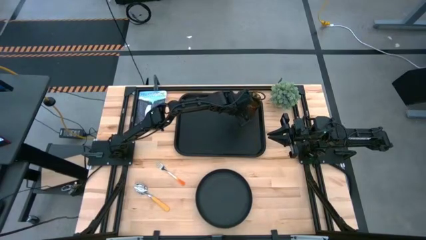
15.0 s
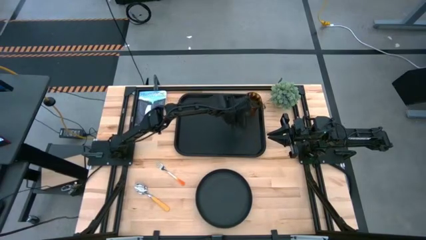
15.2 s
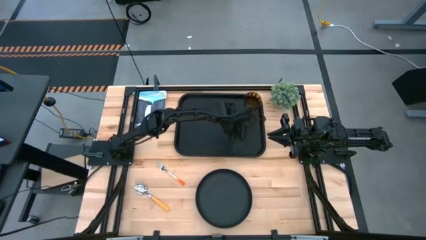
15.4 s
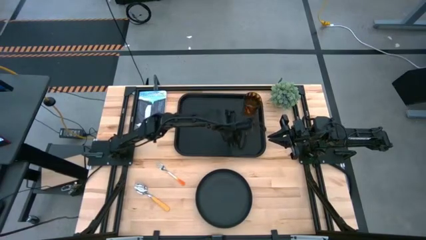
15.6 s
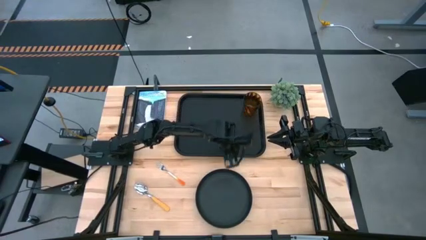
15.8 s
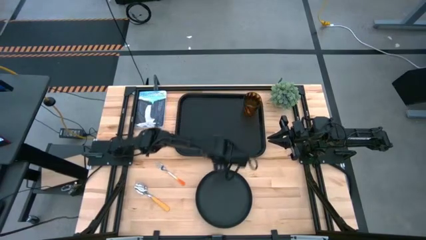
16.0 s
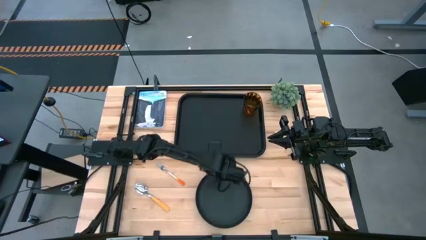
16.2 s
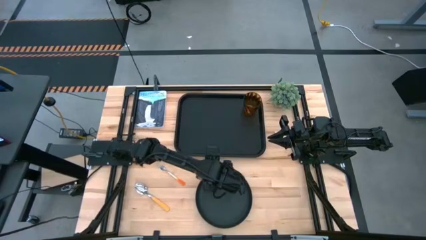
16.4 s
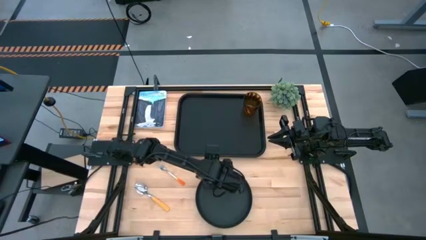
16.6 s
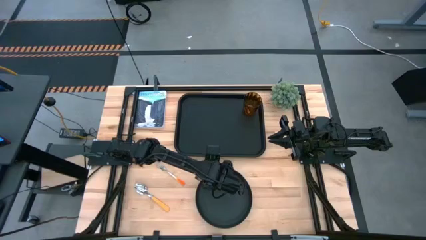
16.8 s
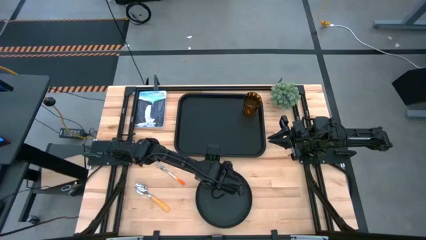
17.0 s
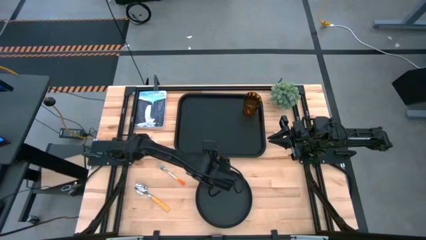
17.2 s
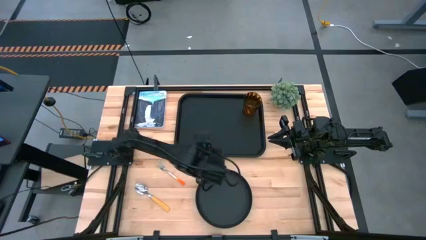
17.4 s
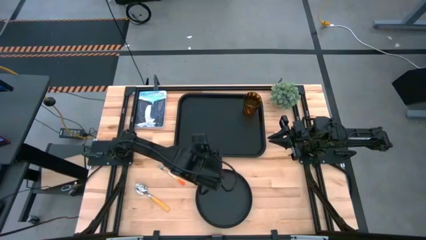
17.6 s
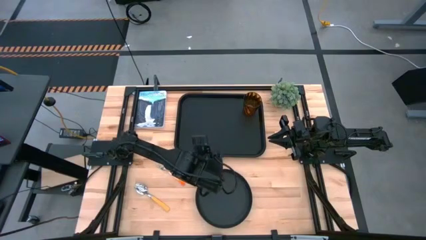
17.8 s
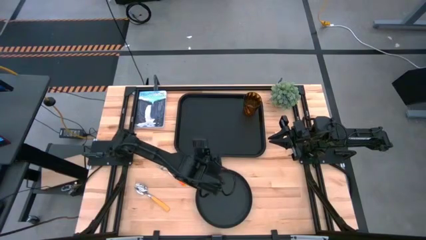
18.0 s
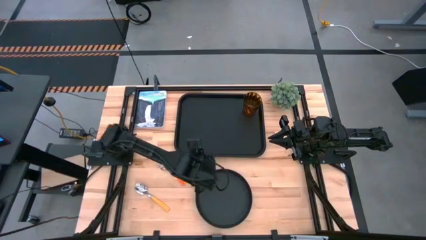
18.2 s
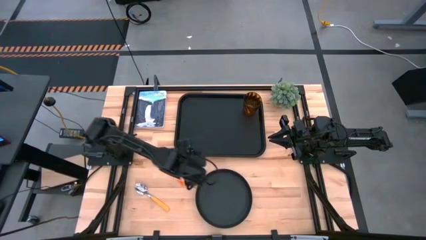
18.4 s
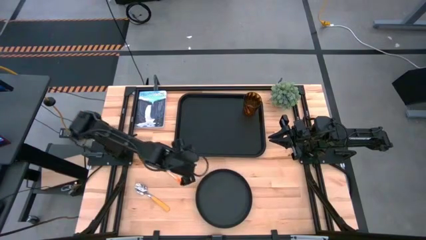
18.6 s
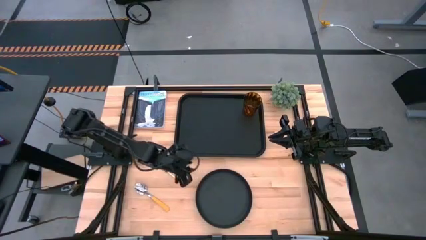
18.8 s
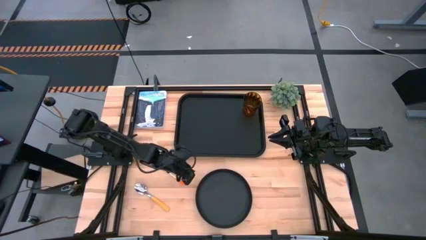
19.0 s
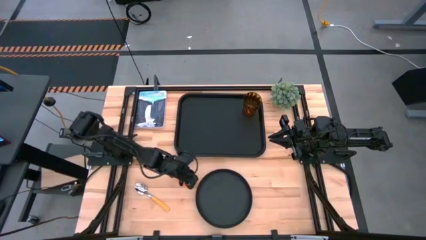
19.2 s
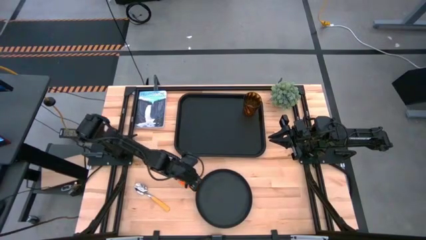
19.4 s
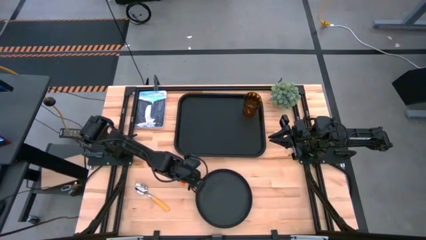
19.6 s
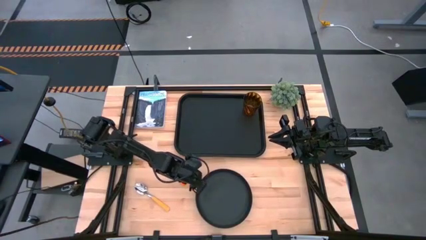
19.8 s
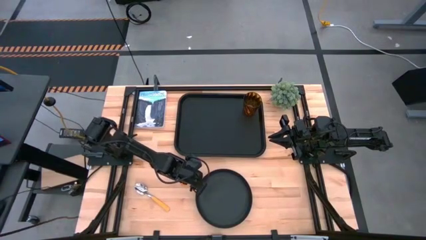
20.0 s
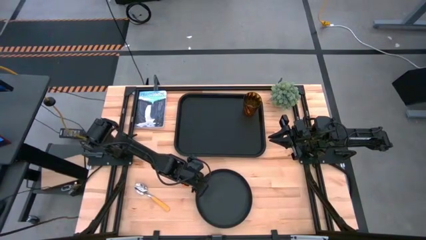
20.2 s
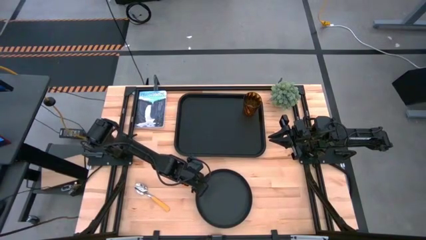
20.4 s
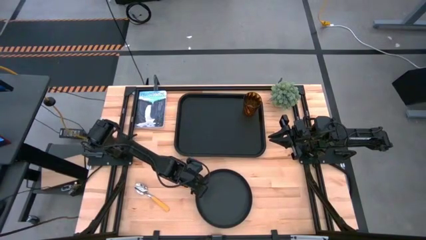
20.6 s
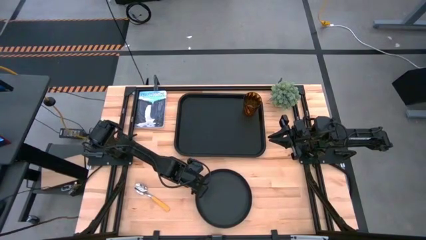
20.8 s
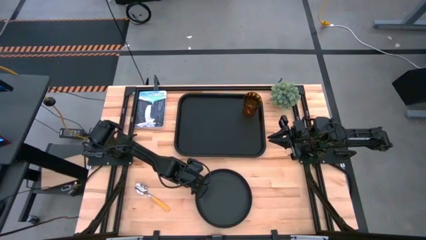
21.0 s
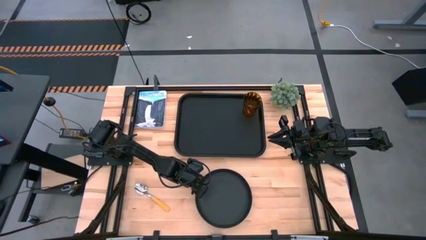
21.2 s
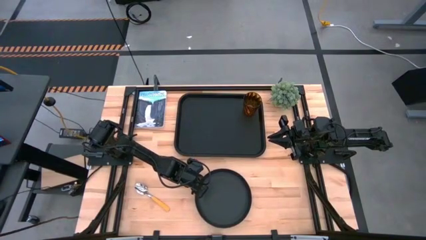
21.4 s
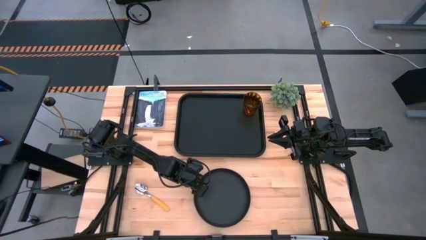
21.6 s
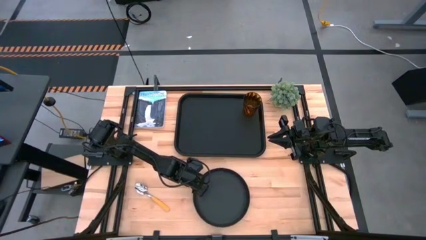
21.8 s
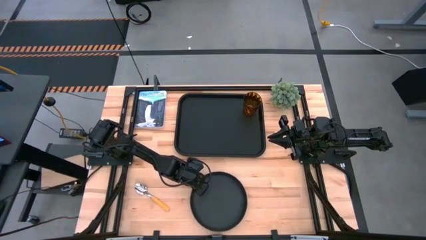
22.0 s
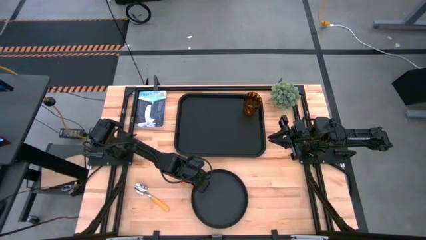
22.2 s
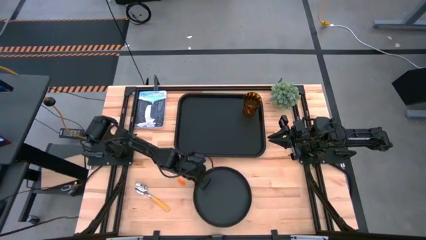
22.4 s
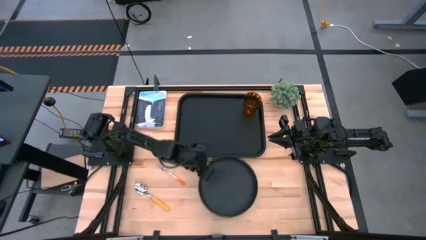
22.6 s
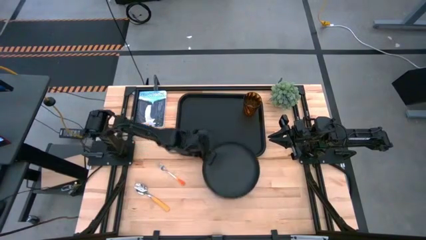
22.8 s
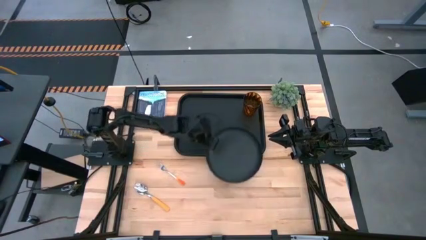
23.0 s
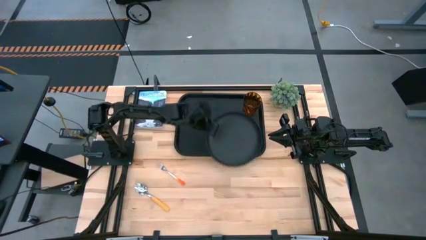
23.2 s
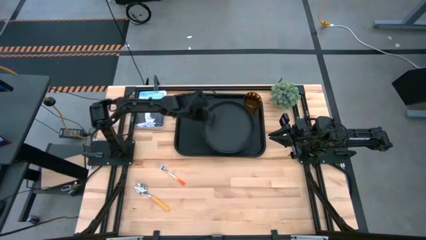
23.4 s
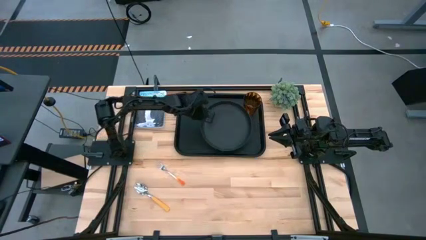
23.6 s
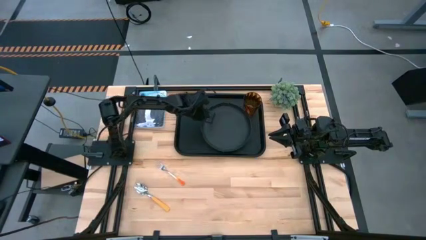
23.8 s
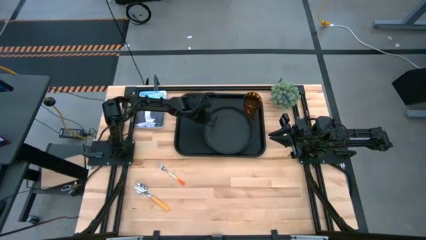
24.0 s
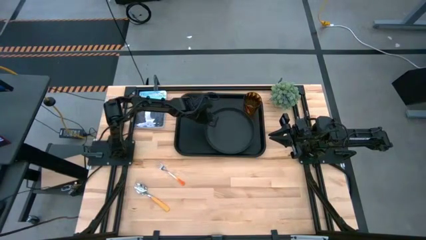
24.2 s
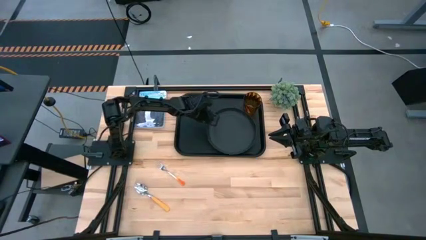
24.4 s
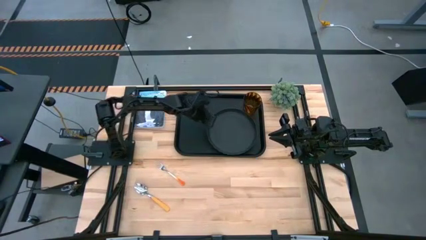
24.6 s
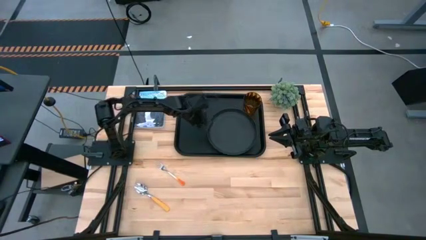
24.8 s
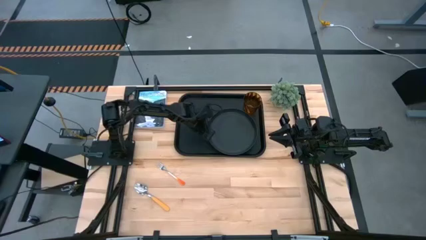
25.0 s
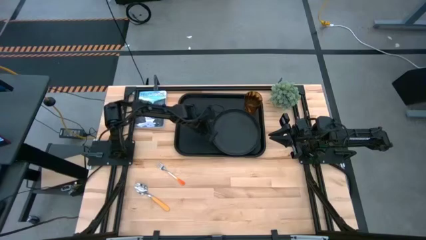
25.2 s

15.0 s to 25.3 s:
Task: Pick and place plate/cup/fork/spoon on tray
Put the black plate on the black tray

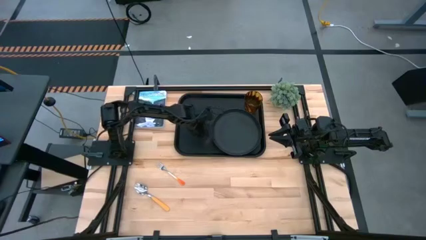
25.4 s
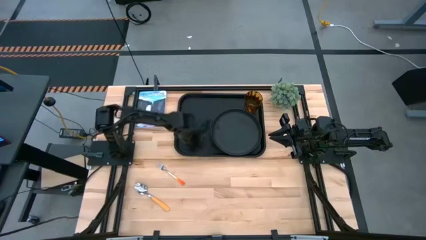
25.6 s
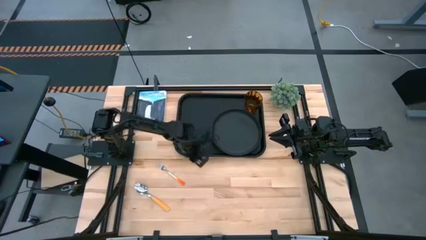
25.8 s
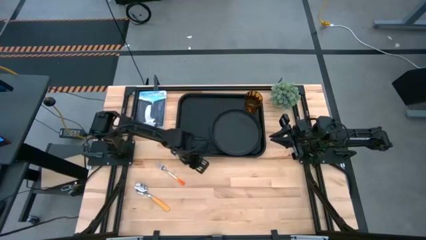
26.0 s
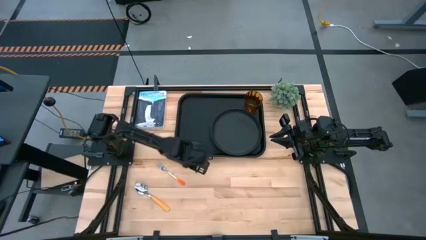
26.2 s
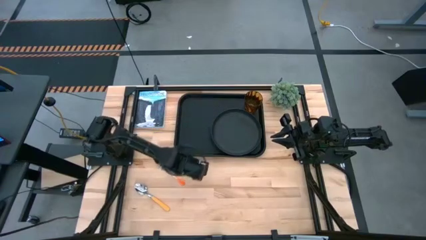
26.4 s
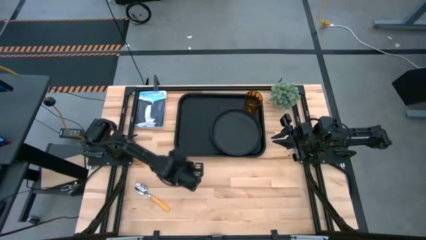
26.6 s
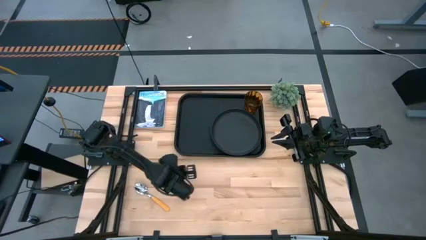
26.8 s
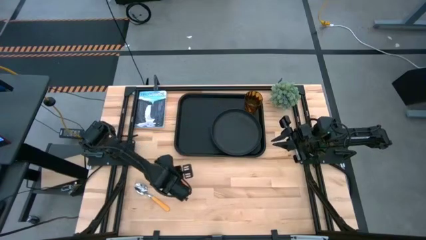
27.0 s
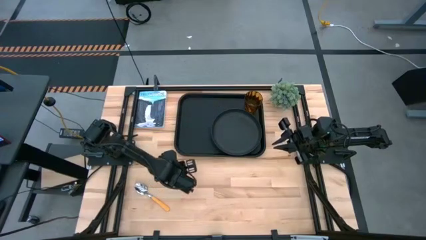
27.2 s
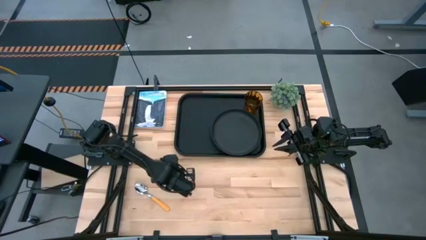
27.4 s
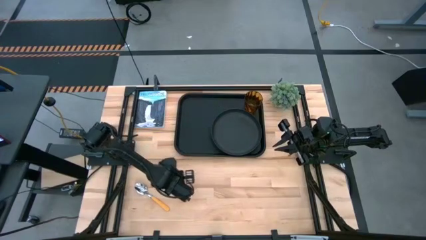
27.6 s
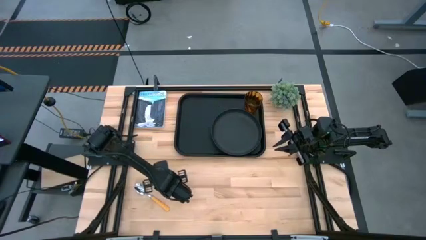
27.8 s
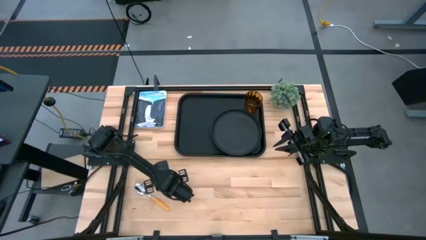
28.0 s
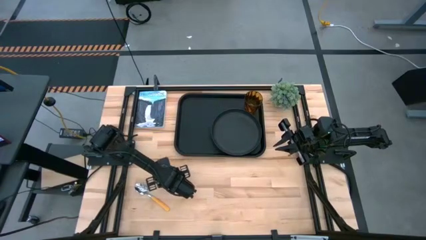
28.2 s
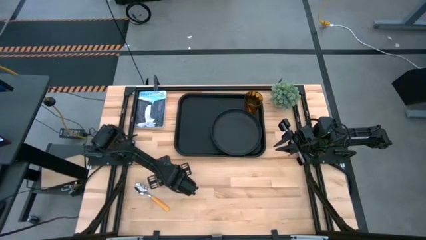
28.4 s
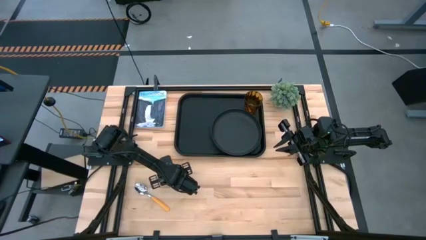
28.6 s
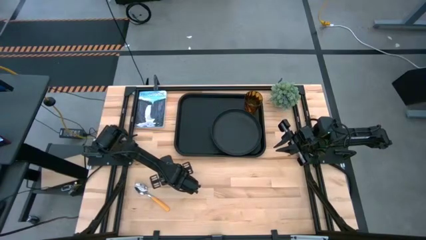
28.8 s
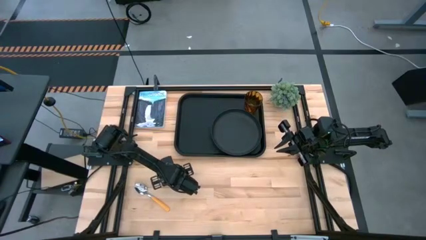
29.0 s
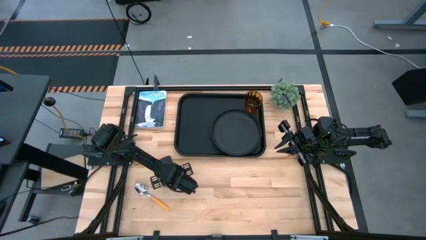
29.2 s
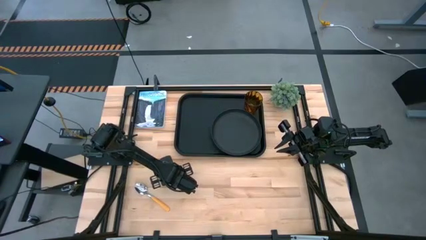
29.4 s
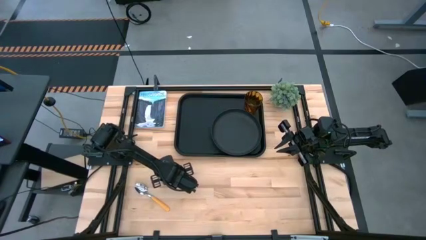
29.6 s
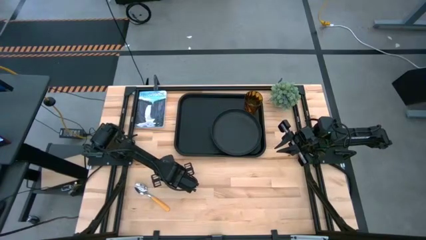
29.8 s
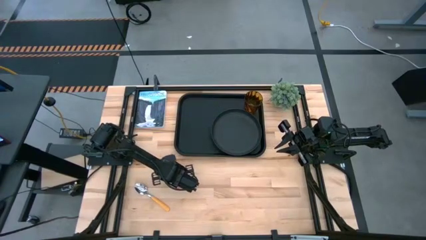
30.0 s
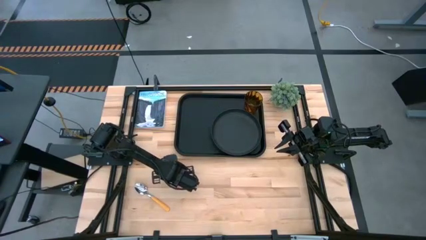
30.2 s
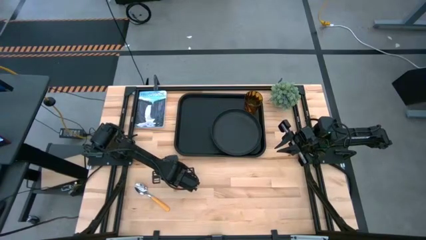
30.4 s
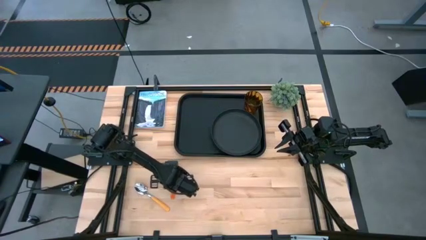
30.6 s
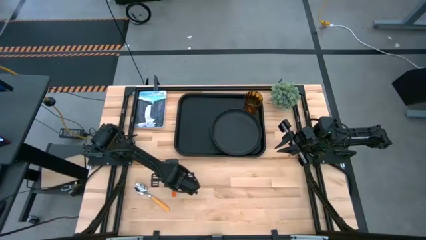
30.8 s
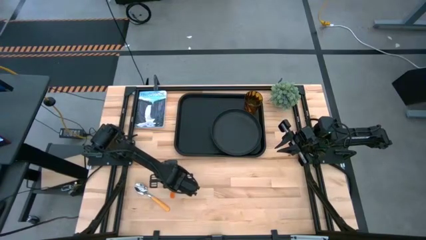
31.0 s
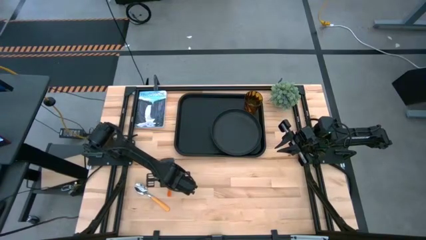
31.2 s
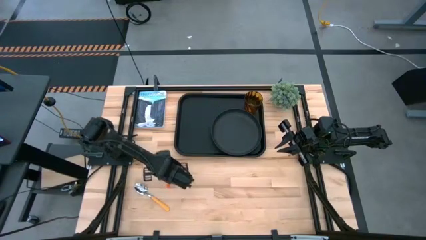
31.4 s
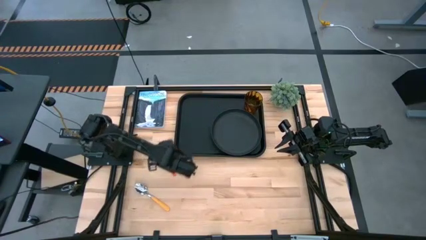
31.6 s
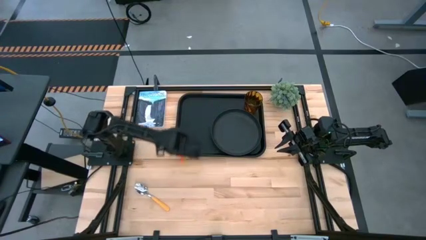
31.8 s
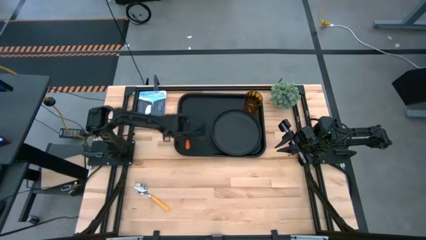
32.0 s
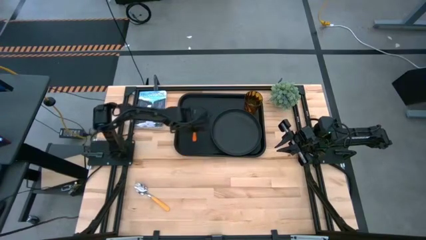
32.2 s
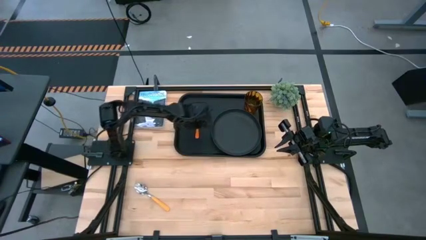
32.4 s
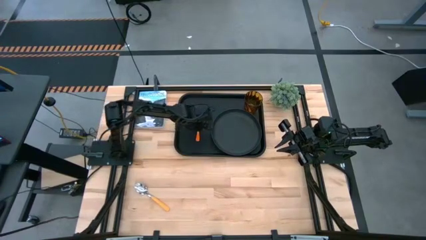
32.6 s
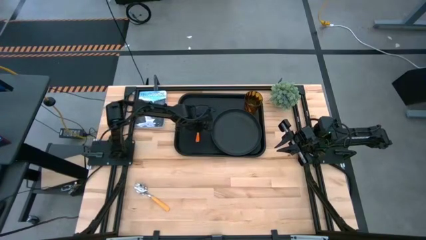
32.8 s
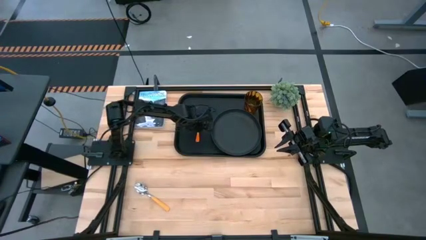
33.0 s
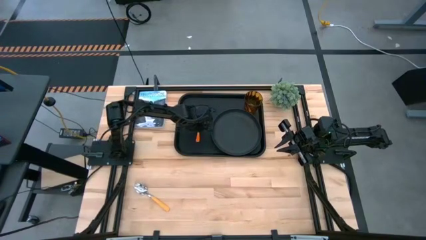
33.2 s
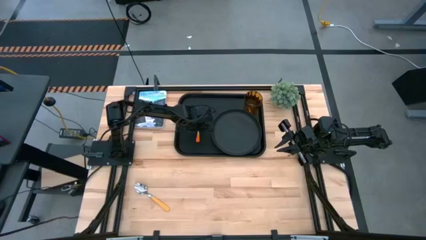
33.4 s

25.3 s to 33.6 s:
Put the orange fork to the left of the black plate on the black tray
